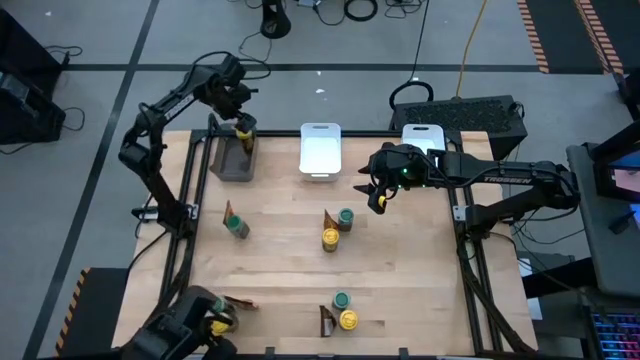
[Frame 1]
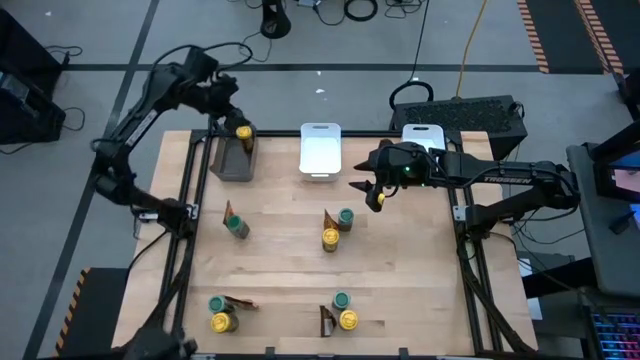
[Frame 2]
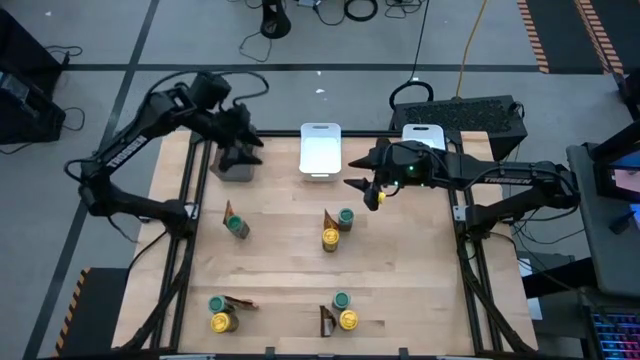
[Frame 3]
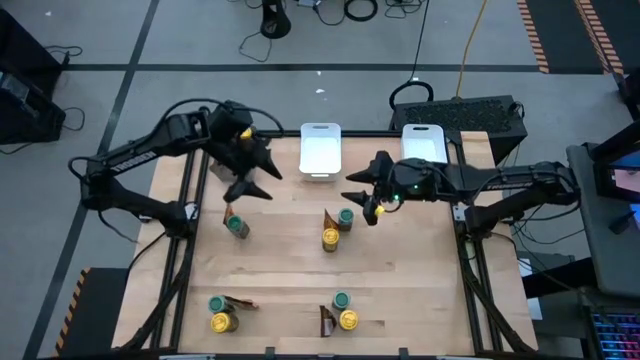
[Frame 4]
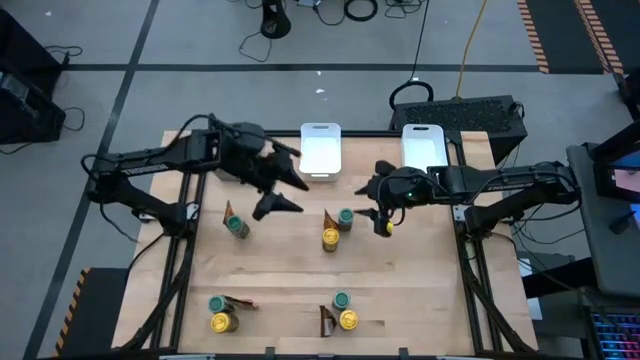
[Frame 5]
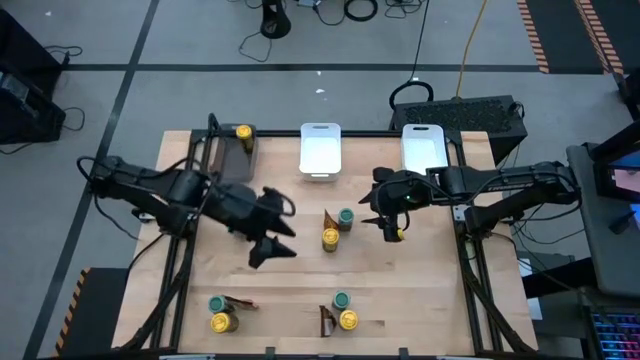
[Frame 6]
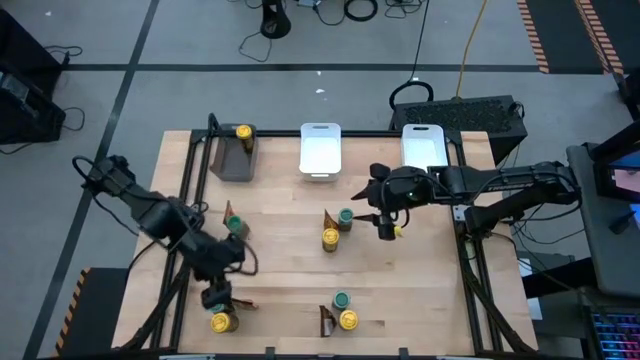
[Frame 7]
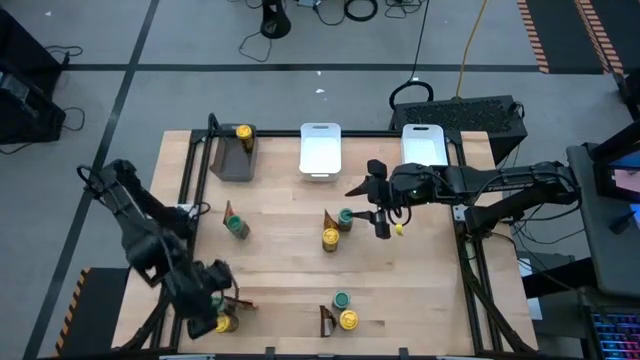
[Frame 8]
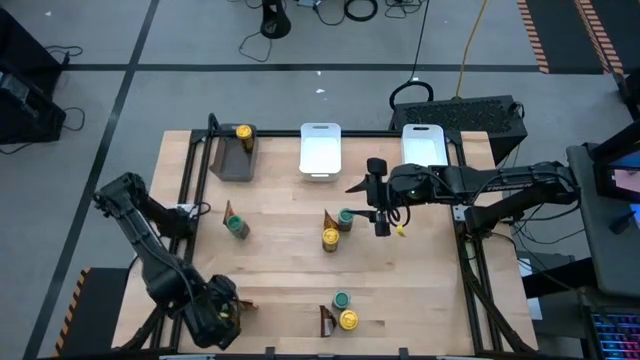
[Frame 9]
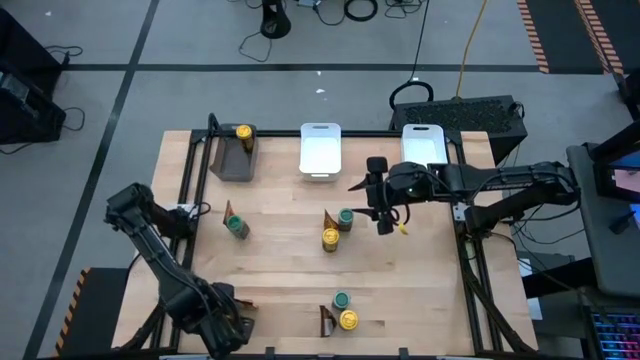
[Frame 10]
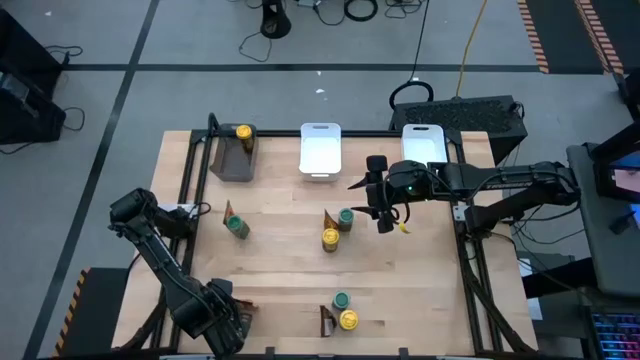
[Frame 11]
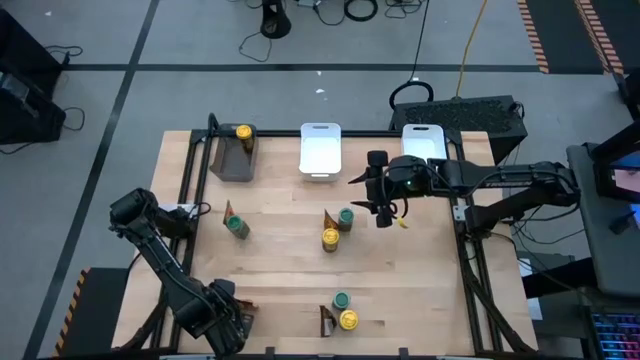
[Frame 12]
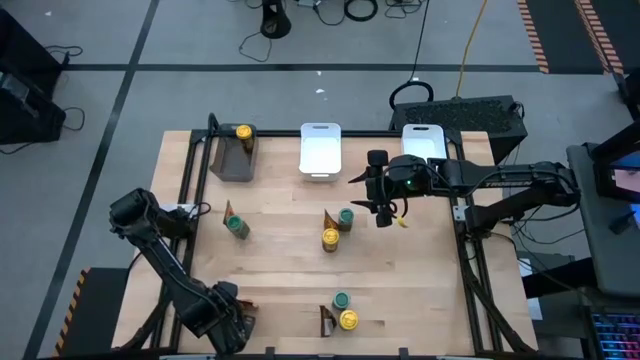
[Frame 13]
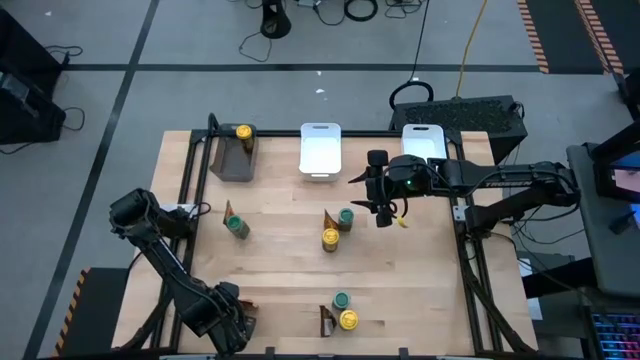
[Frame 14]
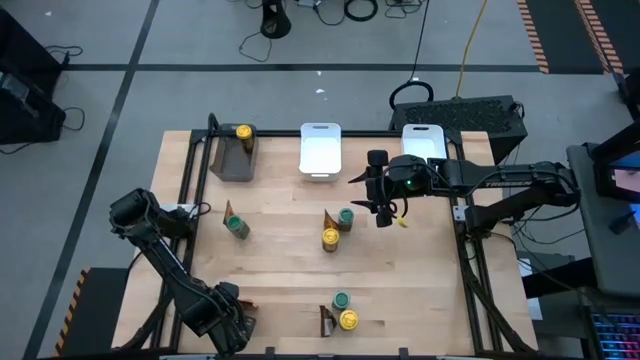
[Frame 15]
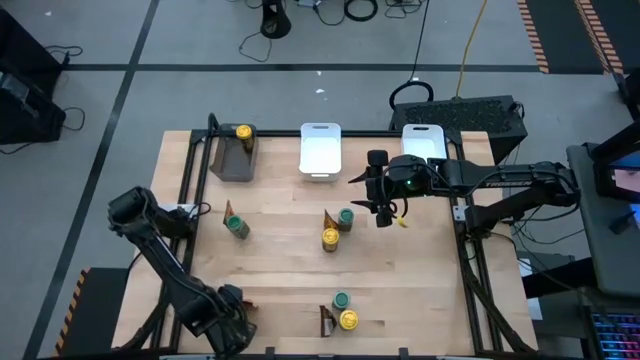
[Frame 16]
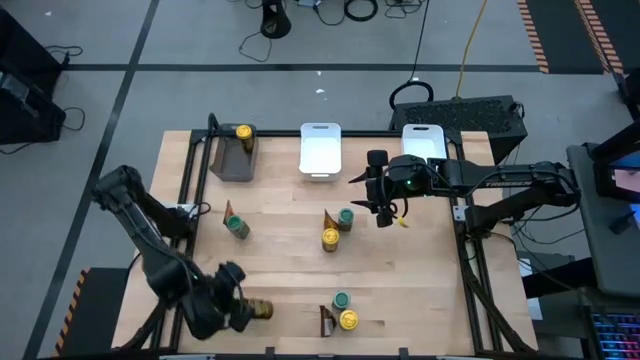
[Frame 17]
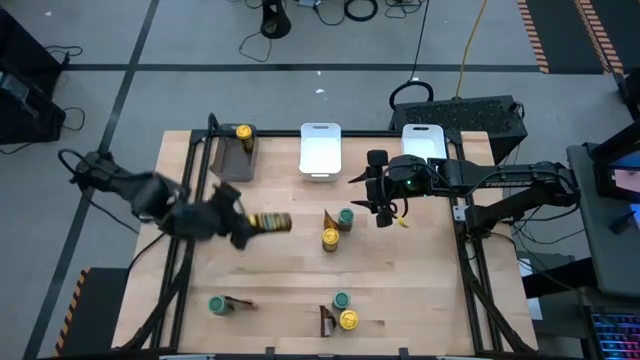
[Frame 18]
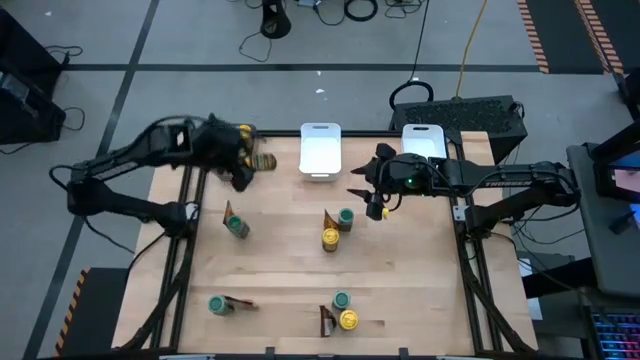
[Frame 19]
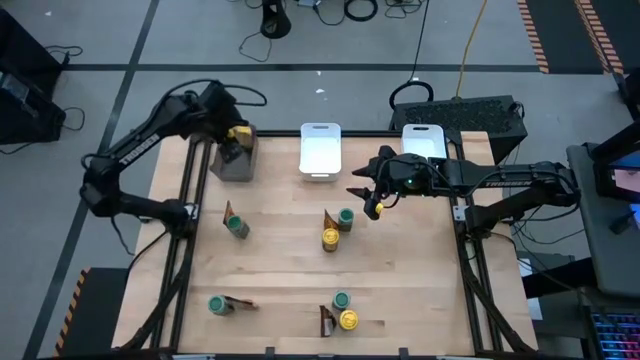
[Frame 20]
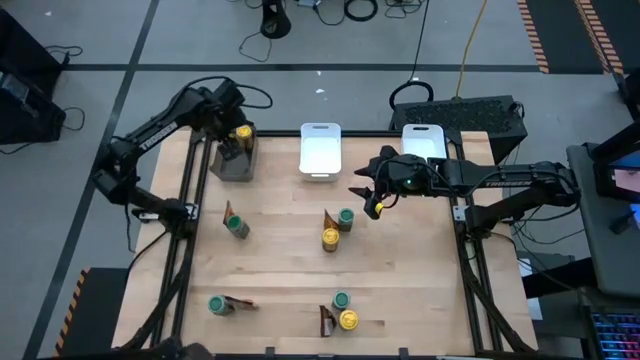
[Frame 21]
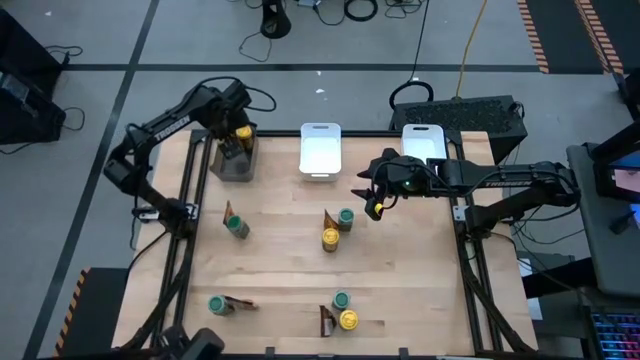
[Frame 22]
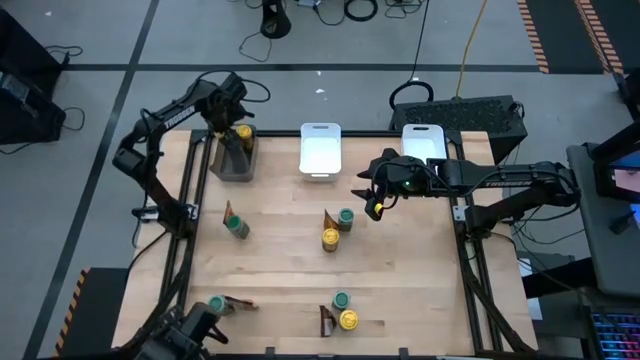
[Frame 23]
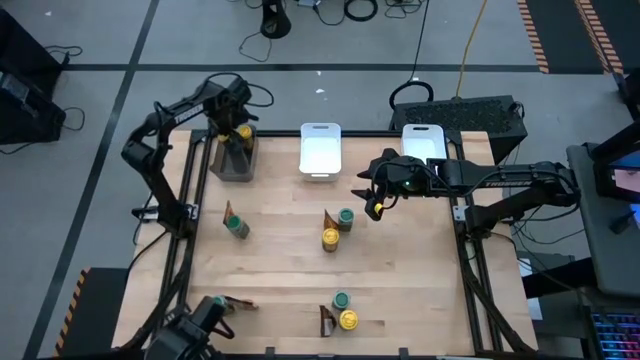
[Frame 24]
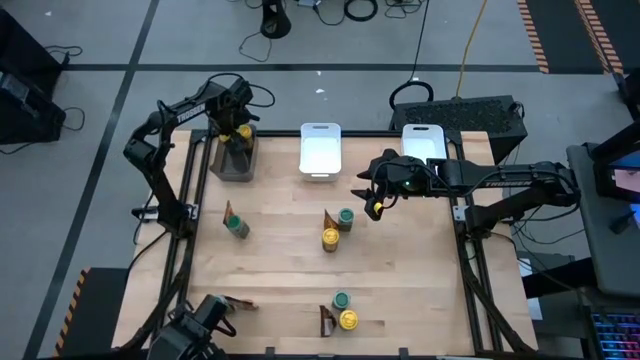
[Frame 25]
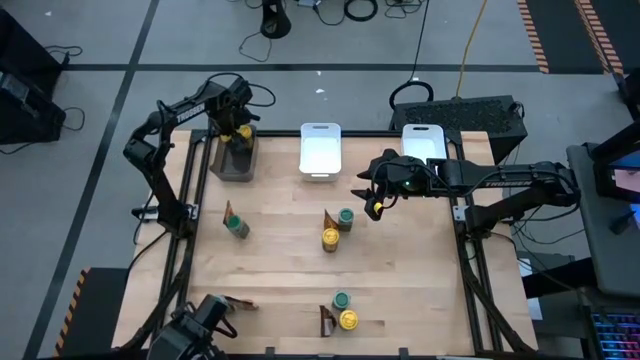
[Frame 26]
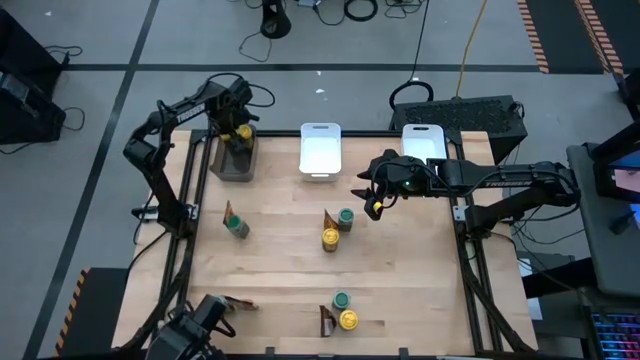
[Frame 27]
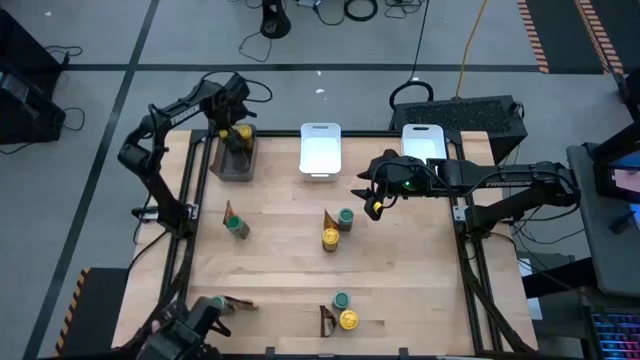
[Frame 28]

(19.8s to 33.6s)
Task: Sort spices by type
Put the bottom left yellow seasoning bottle into the black bin

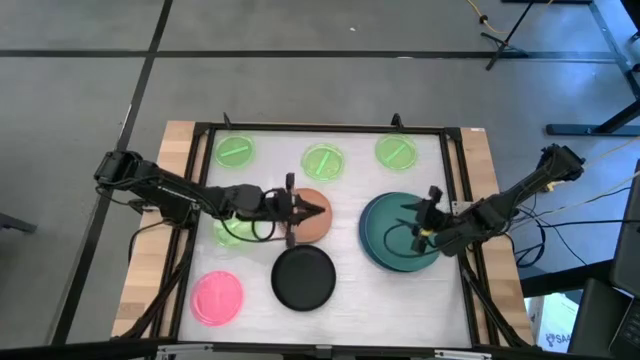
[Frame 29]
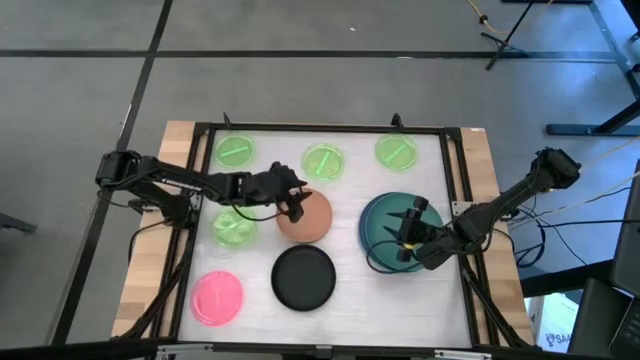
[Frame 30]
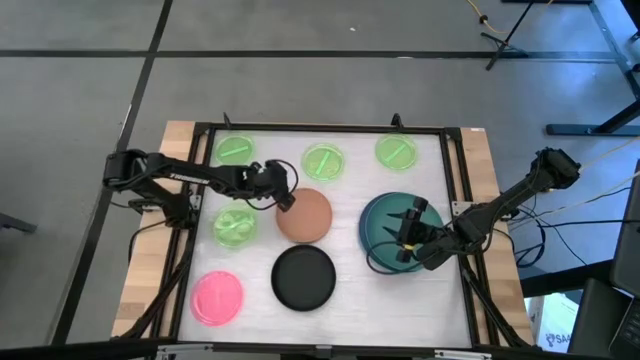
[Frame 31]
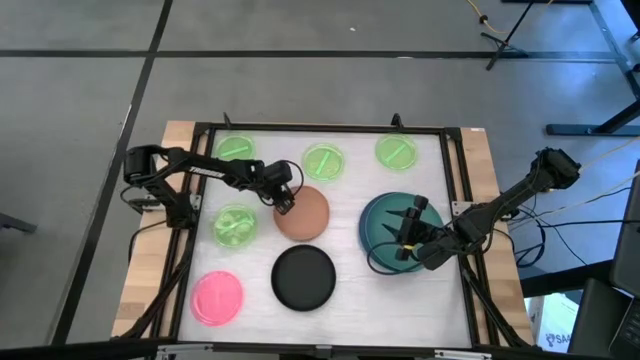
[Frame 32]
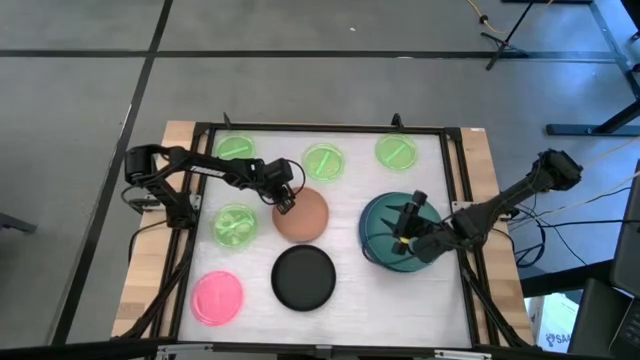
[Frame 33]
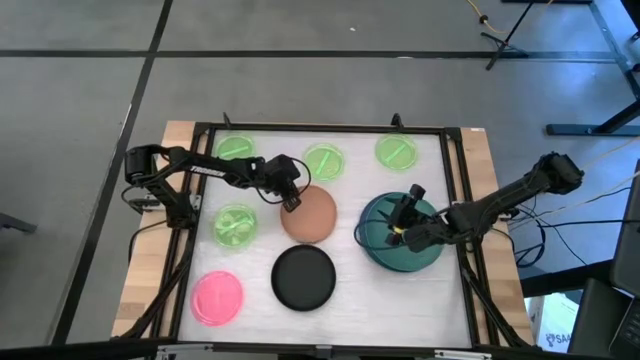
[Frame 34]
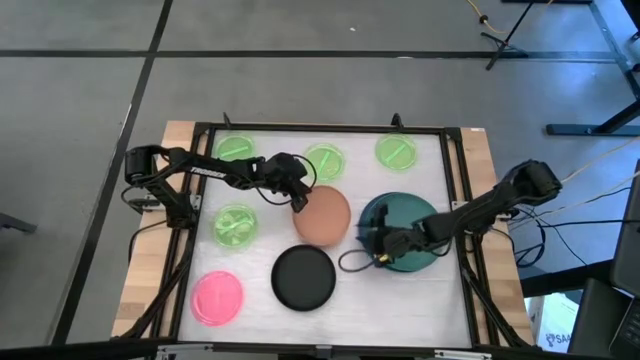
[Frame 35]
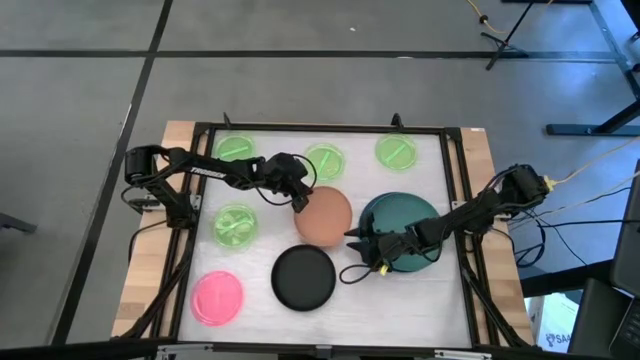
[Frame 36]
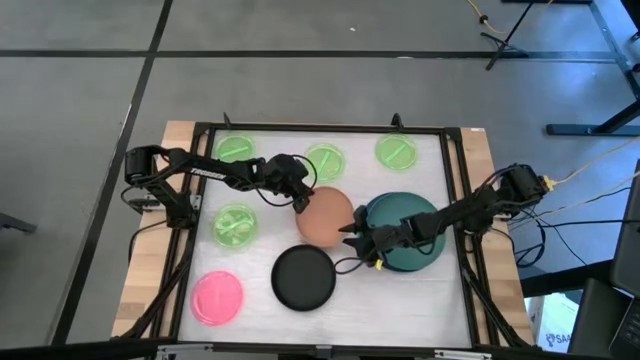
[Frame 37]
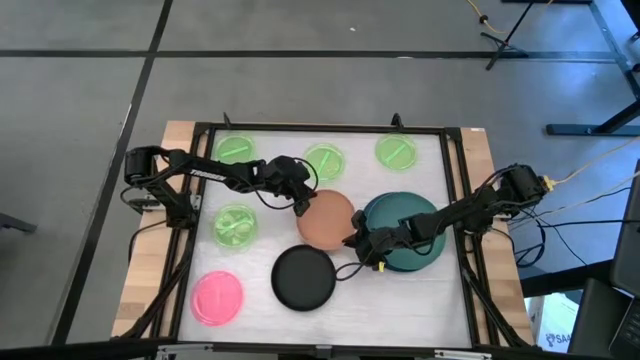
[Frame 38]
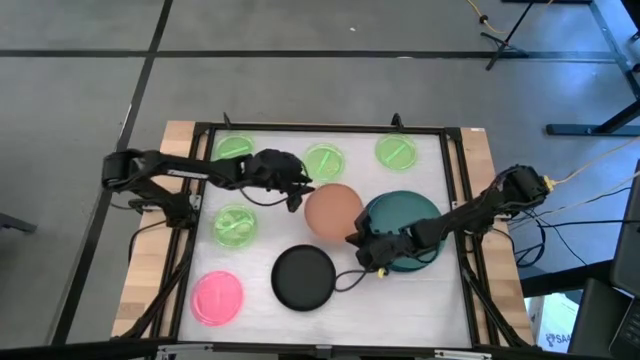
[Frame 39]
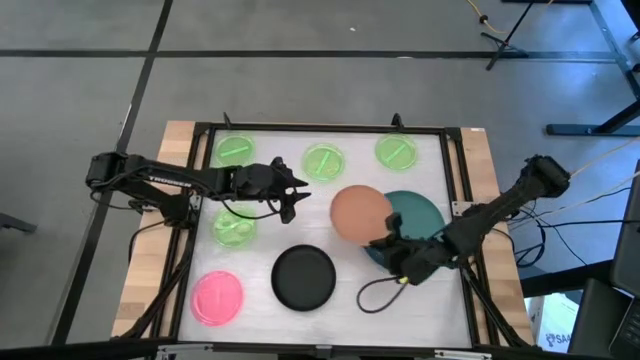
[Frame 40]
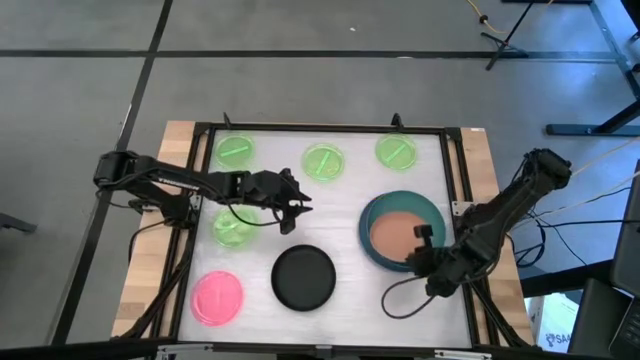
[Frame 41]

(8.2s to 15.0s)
Task: Stack plastic plates
Stack the orange plate into the green plate

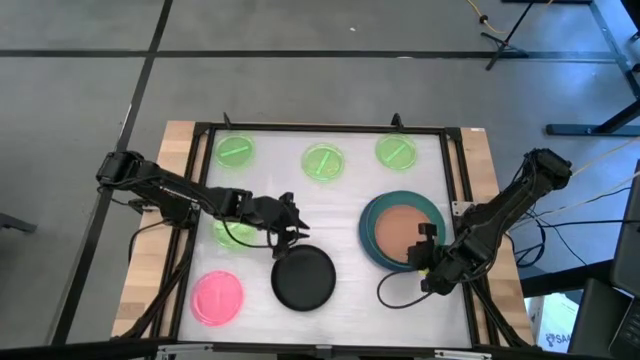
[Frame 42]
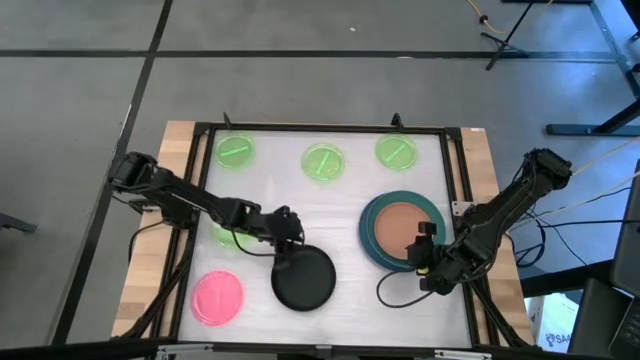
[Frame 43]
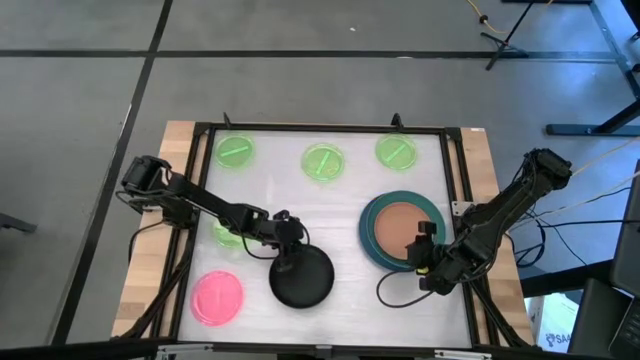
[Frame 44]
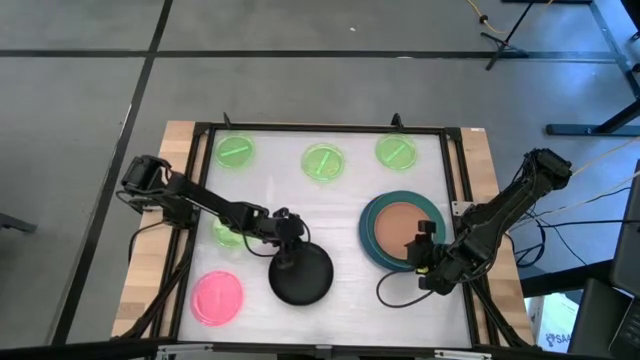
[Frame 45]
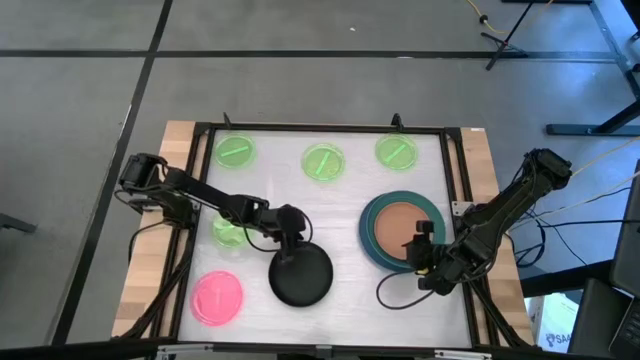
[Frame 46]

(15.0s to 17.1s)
Stack the black plate into the orange plate
